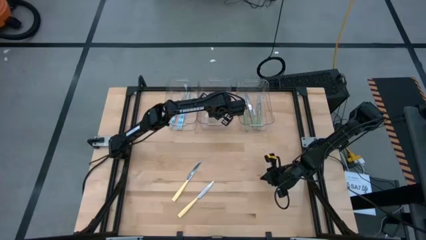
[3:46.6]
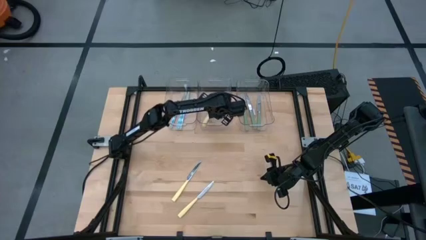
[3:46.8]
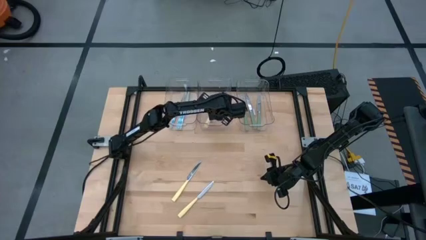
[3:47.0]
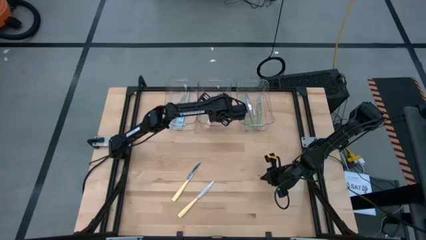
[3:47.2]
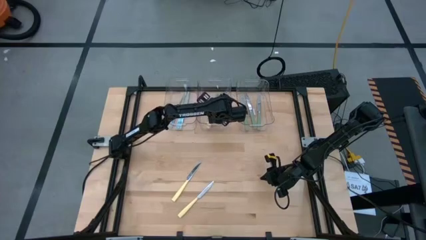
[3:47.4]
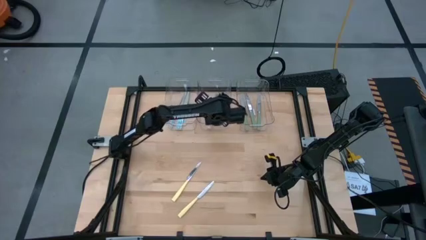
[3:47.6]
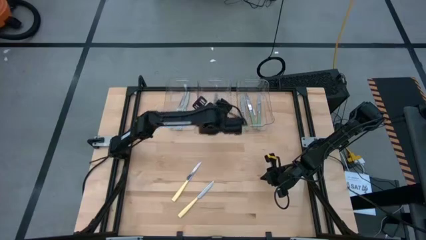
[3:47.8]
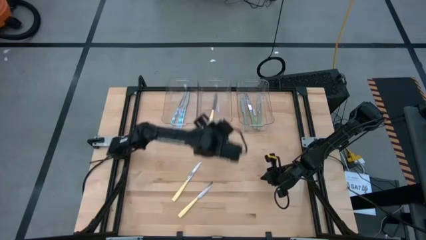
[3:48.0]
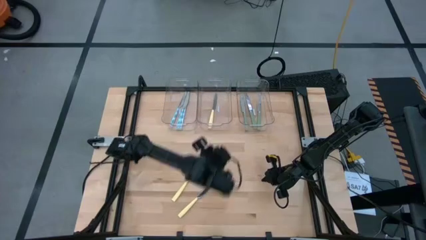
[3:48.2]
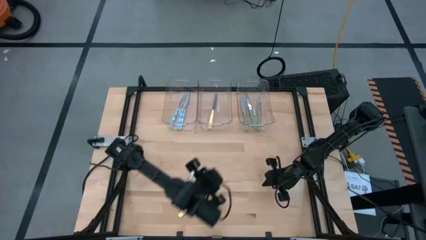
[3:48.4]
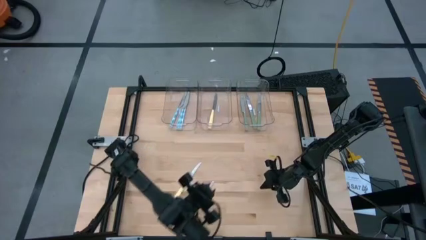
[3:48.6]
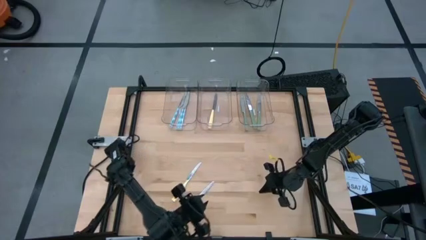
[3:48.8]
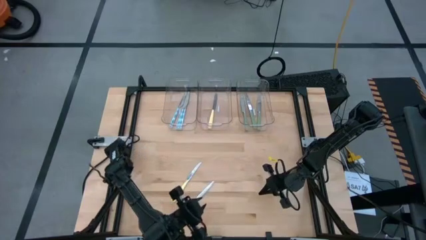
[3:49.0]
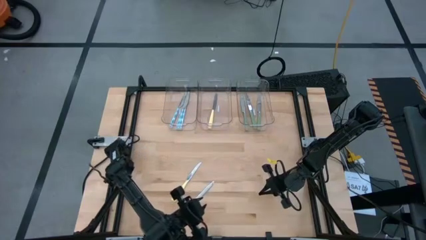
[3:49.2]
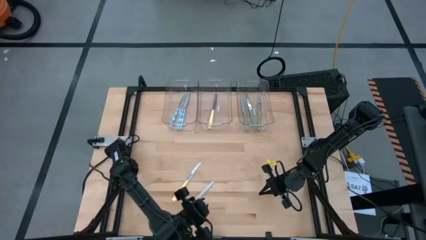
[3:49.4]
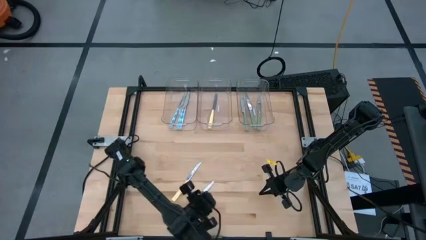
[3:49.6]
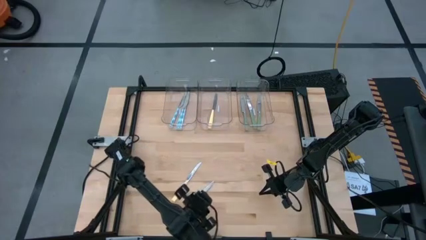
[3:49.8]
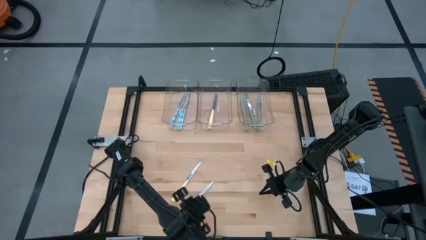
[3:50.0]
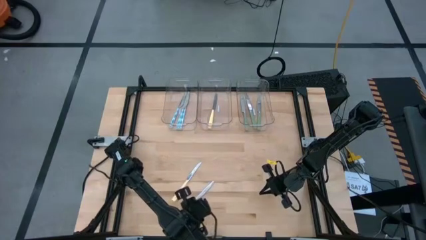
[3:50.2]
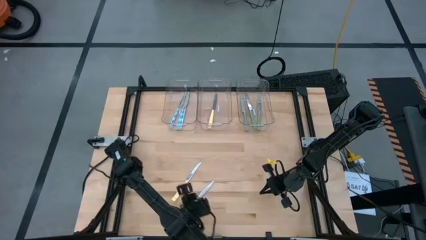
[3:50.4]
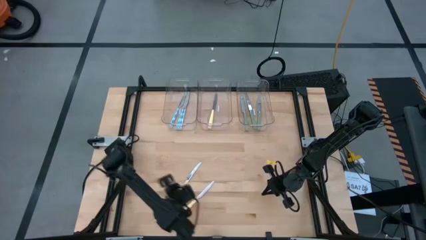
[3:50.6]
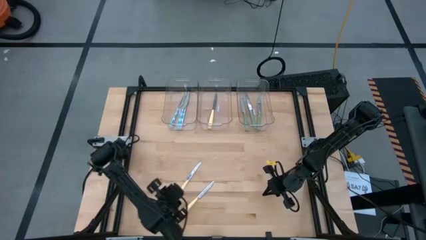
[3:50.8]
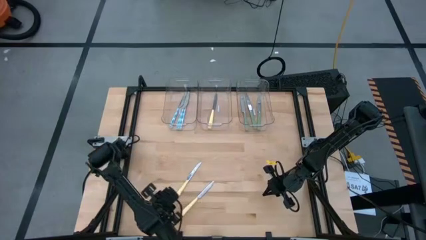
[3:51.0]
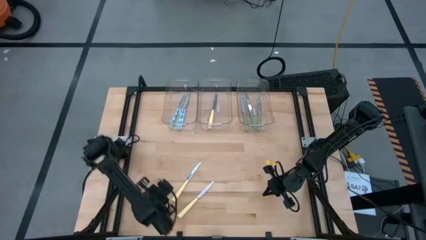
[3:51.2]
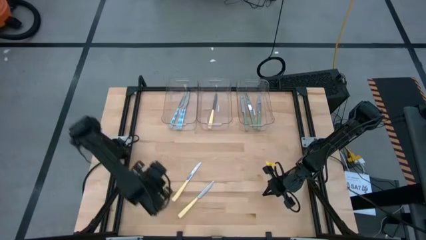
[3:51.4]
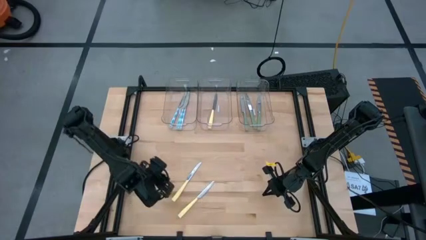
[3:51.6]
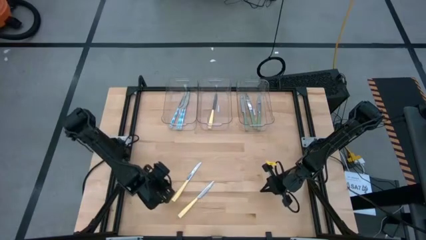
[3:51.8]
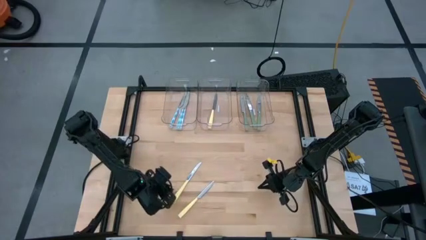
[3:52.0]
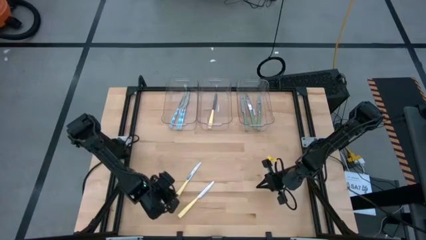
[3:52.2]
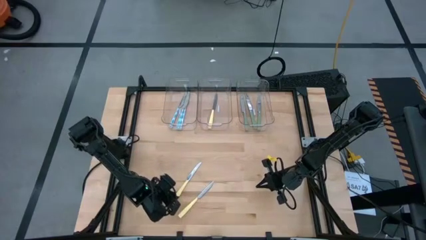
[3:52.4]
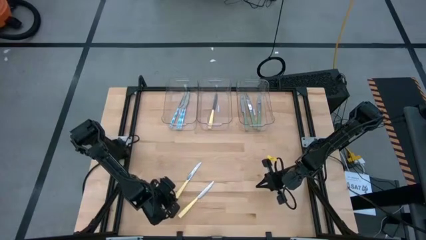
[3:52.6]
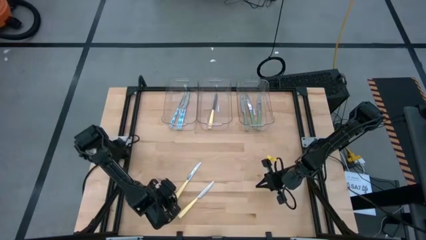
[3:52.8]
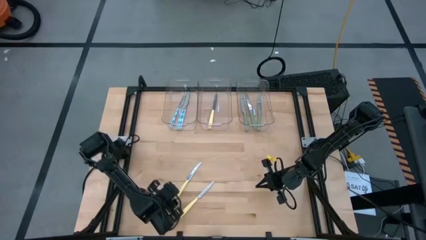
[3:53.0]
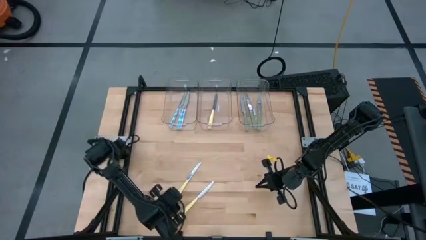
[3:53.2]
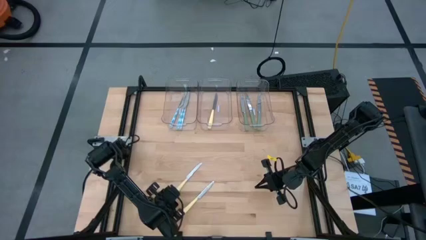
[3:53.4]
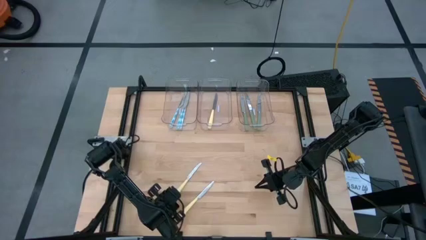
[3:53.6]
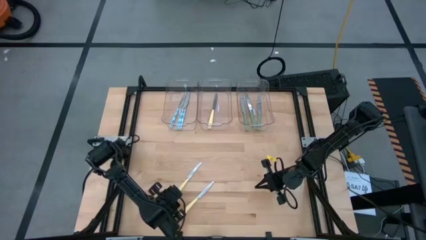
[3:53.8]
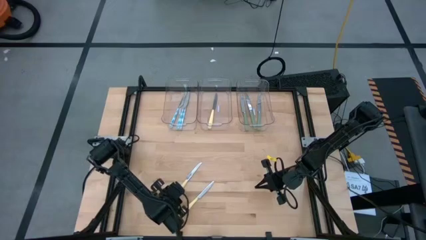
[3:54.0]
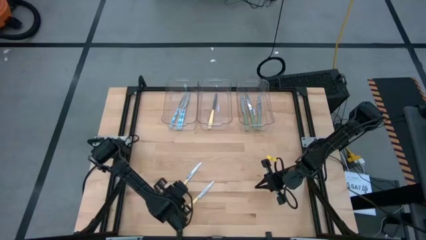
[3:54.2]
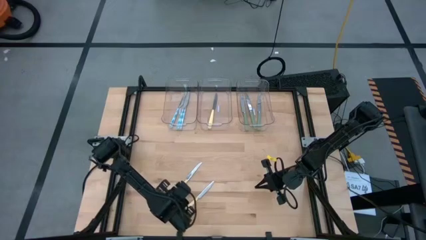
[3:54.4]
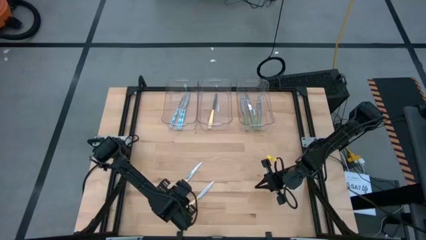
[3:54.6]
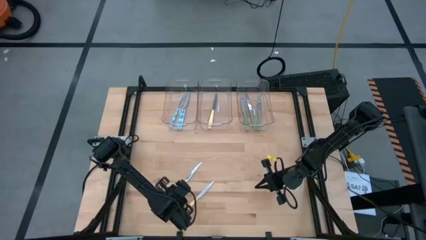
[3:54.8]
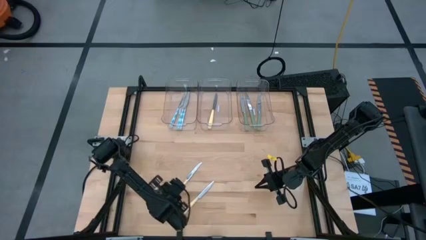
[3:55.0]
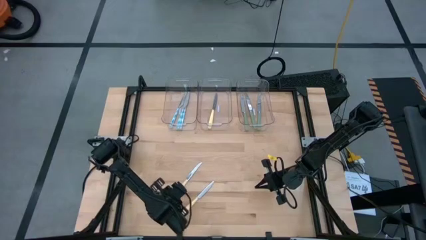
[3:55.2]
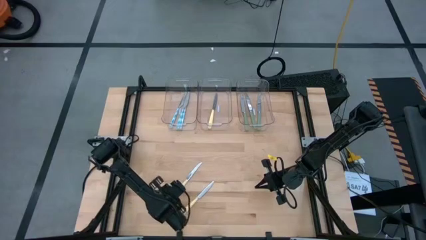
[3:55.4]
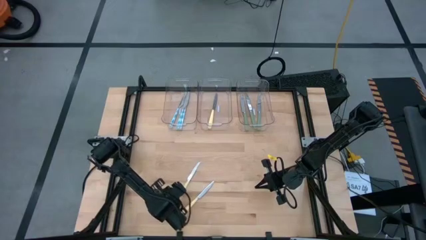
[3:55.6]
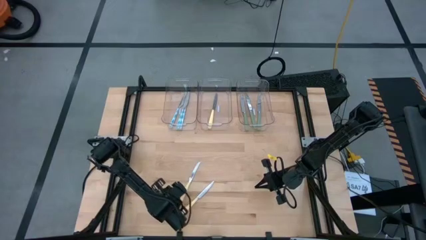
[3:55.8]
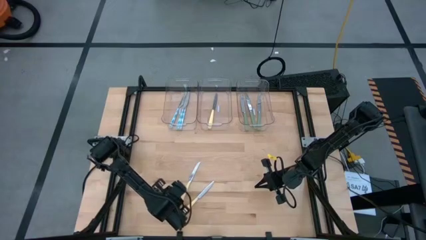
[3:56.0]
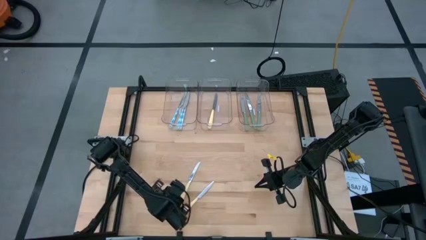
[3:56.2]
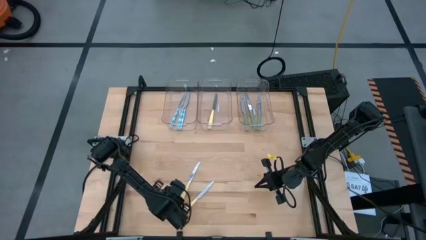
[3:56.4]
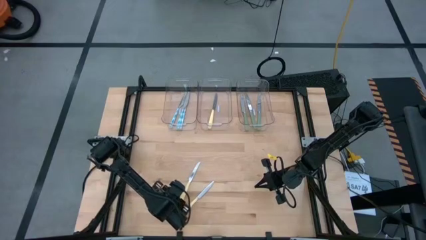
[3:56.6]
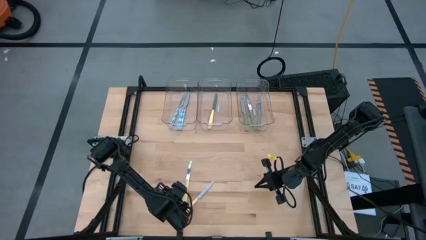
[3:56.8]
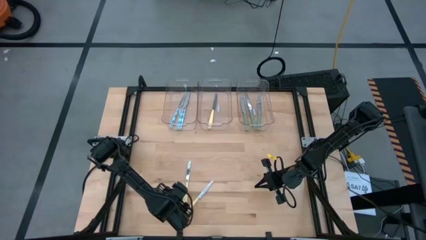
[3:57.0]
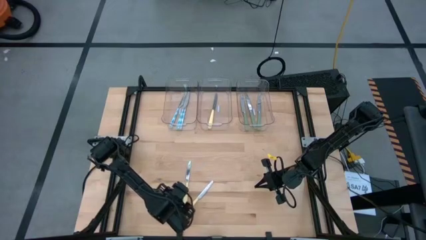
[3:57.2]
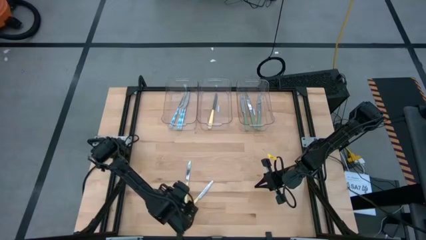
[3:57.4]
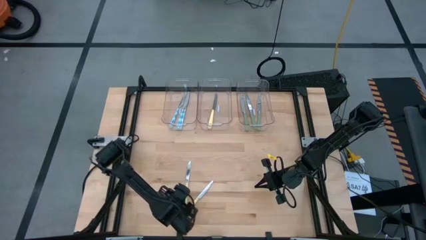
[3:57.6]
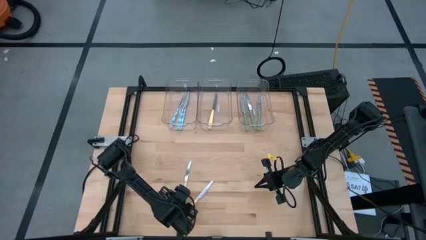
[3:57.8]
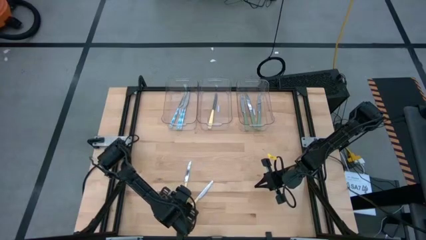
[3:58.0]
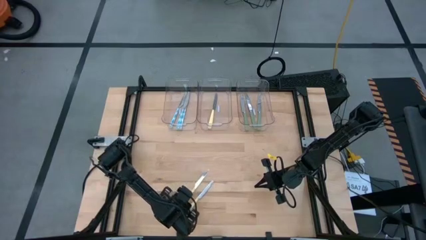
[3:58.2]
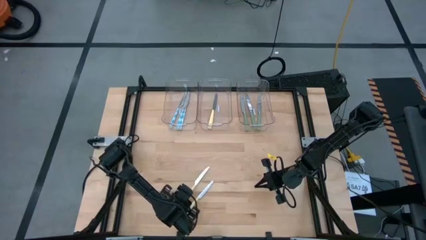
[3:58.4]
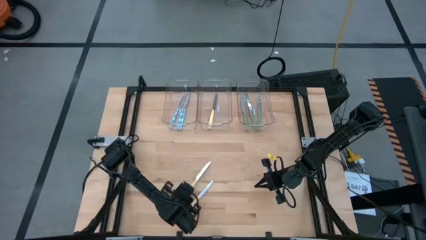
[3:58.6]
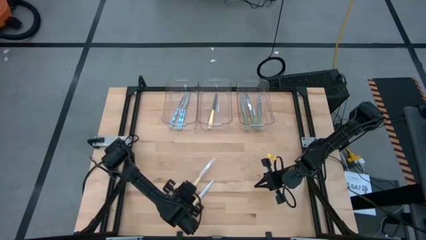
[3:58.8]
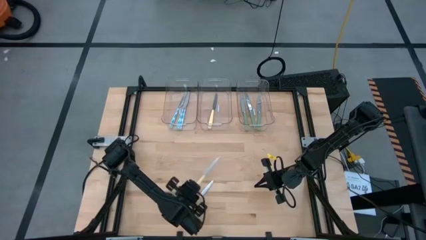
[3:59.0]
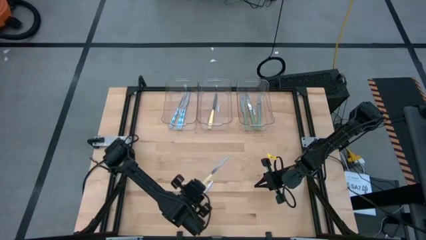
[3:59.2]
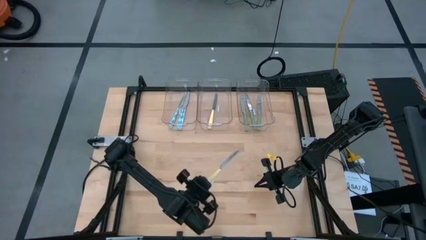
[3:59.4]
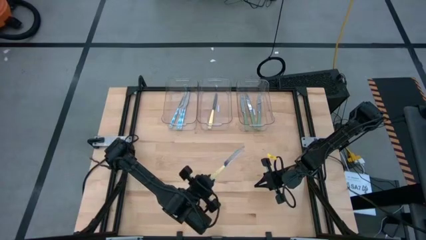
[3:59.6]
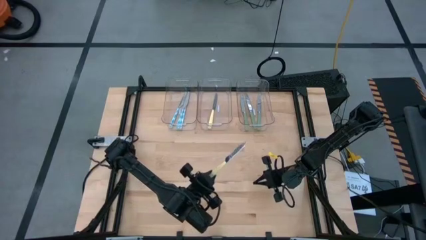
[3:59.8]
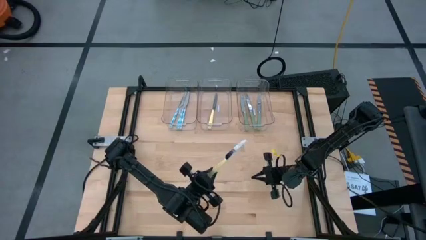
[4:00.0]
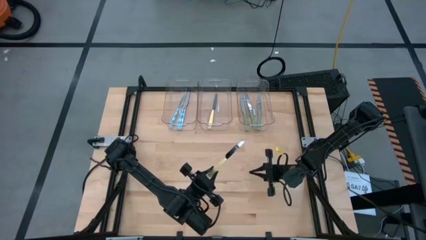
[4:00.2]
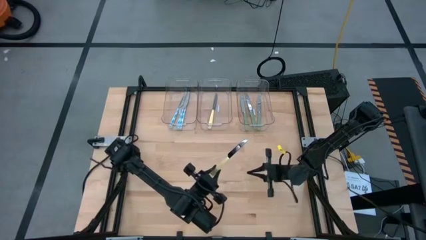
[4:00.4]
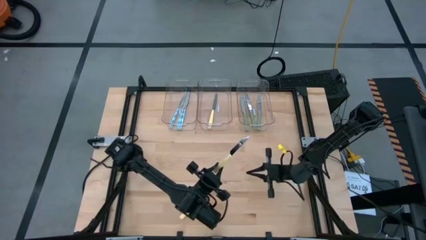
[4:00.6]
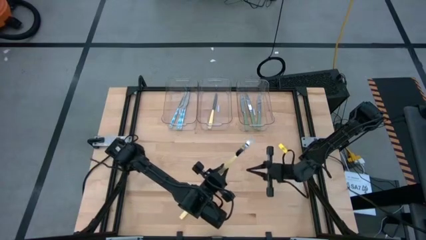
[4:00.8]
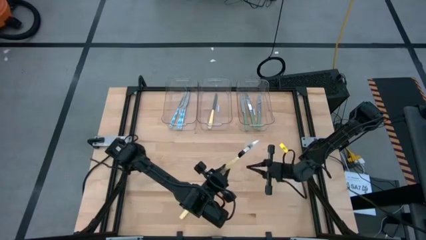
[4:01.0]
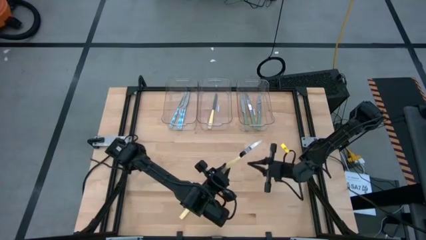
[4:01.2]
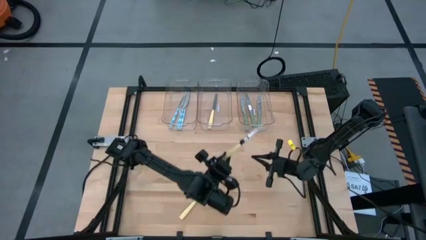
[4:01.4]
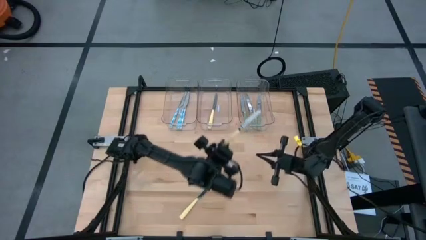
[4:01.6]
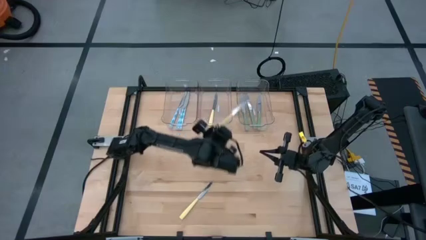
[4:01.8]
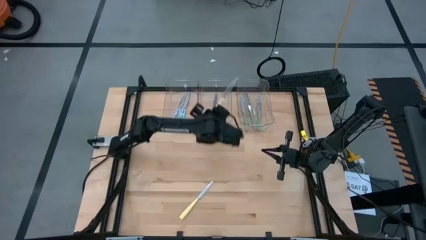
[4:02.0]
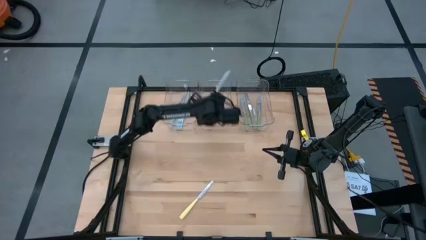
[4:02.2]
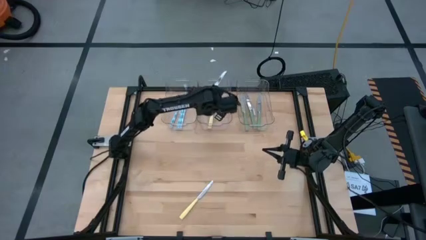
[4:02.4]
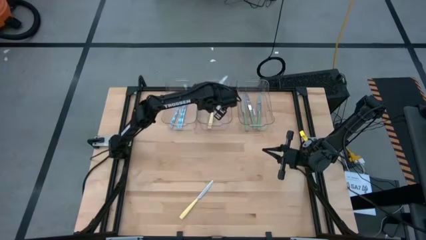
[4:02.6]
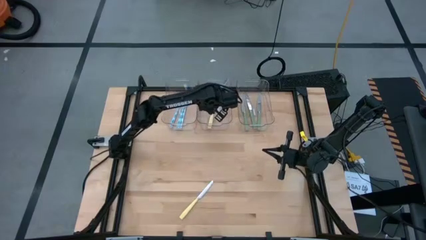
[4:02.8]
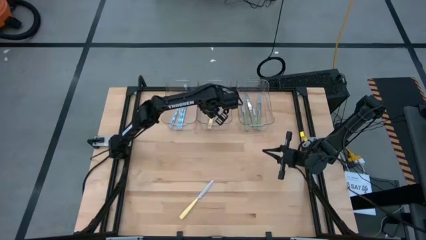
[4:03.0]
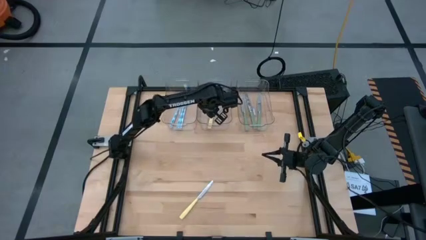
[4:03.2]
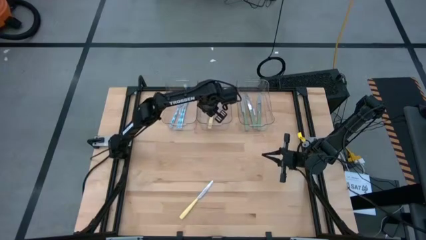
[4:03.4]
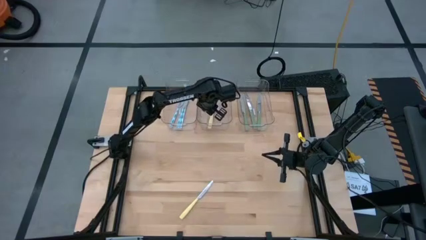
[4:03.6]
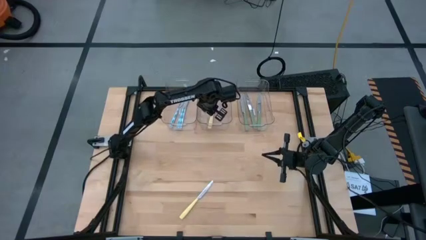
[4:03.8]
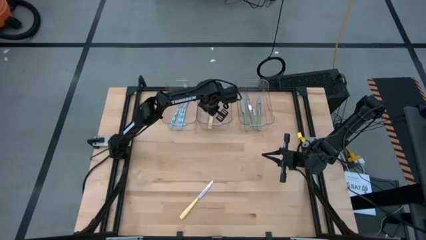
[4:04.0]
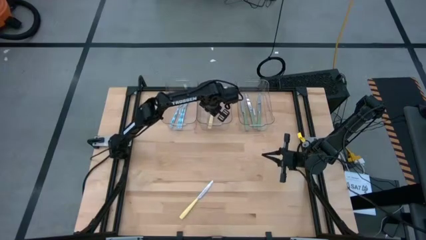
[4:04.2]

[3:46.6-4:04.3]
Task: Sort silverware by color (type)
Put the yellow knife into the middle transparent bin
